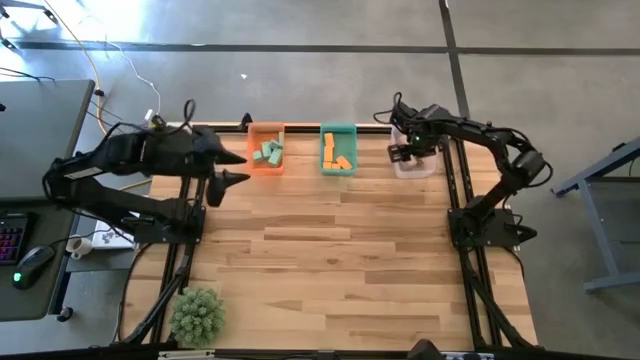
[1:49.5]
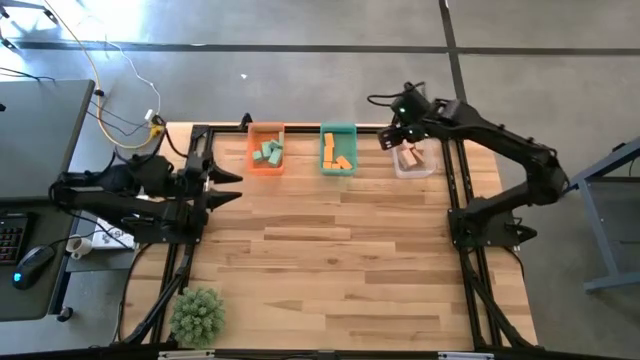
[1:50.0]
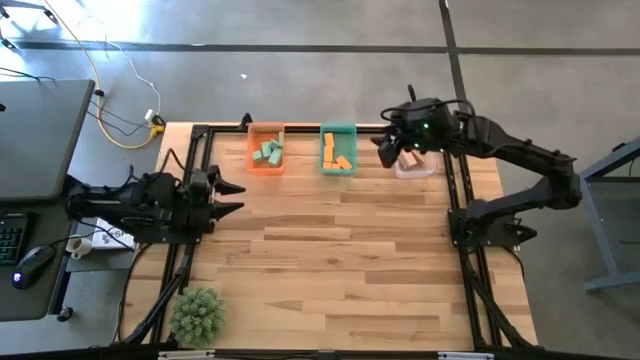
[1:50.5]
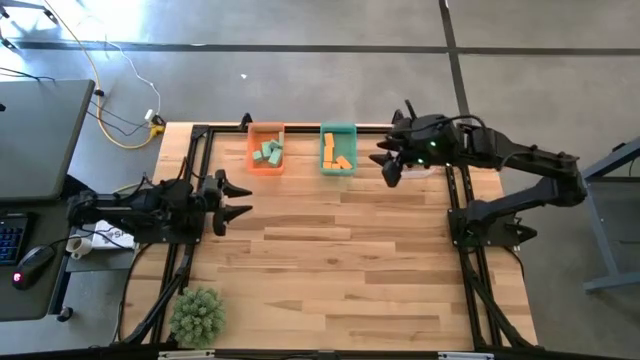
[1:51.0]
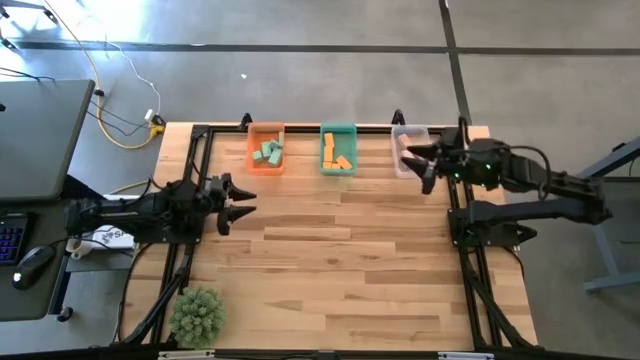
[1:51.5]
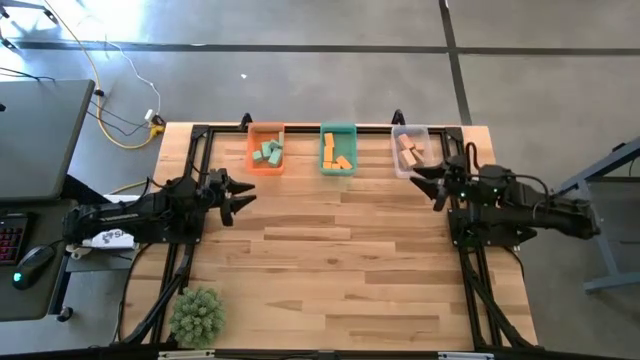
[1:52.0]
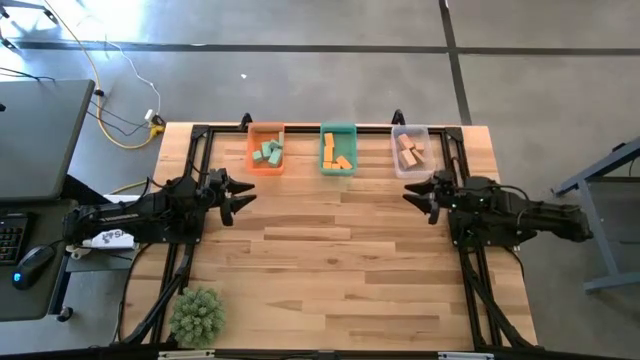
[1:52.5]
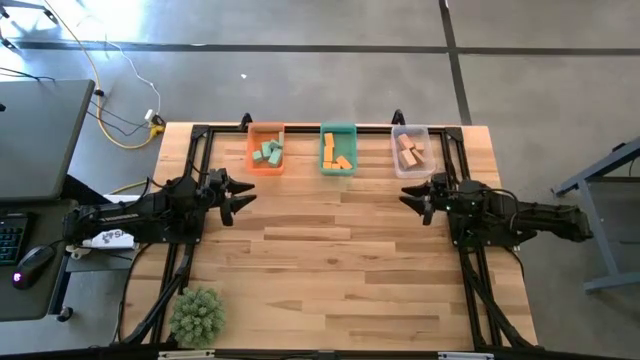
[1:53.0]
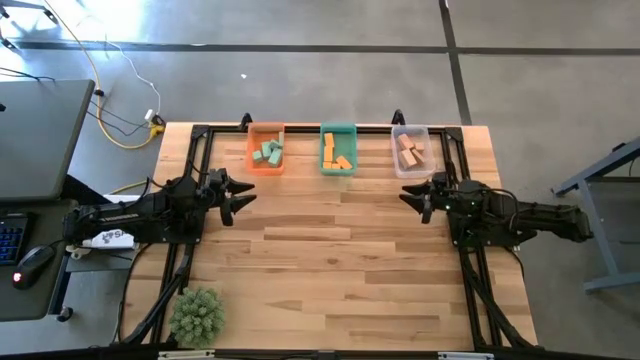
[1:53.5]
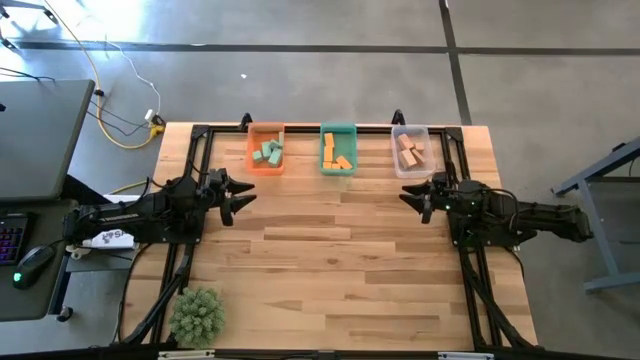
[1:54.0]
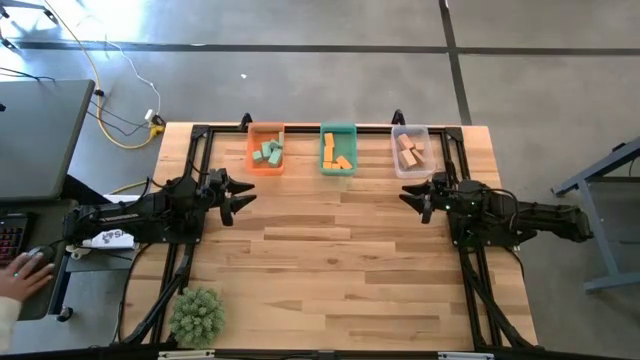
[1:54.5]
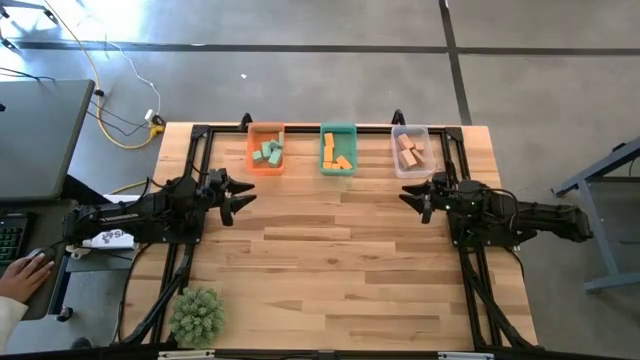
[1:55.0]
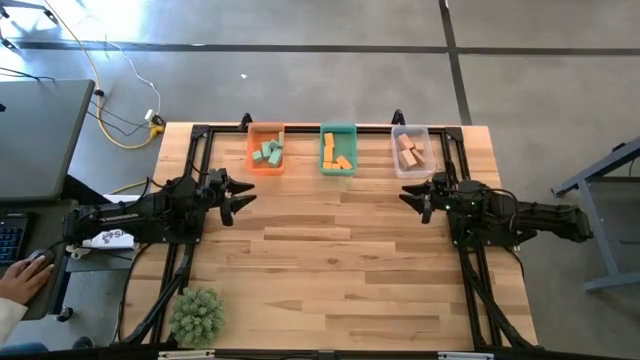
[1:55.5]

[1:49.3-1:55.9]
Task: Sort & place blocks by color
Return to Home Position

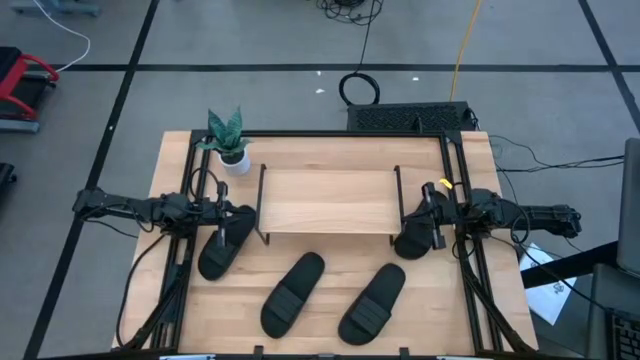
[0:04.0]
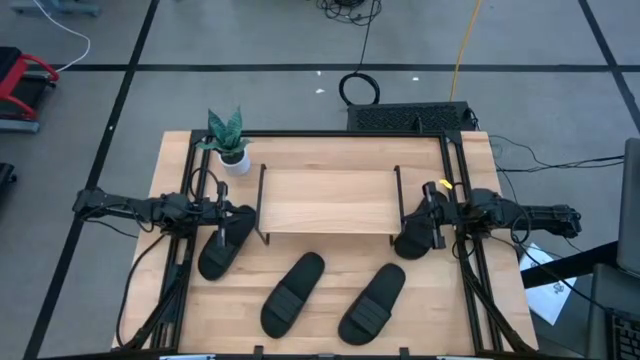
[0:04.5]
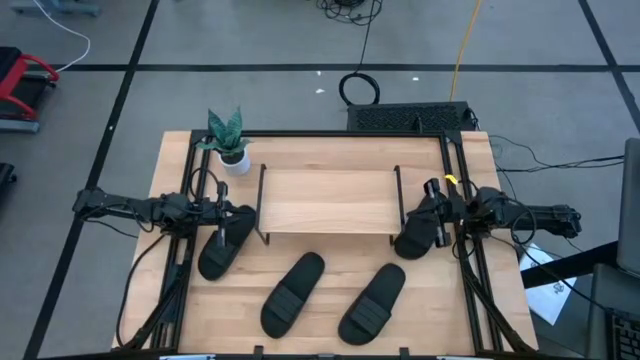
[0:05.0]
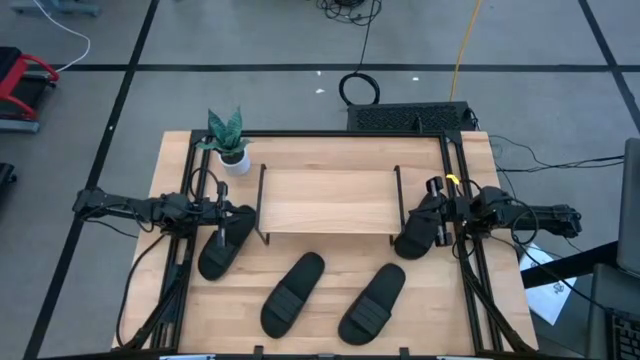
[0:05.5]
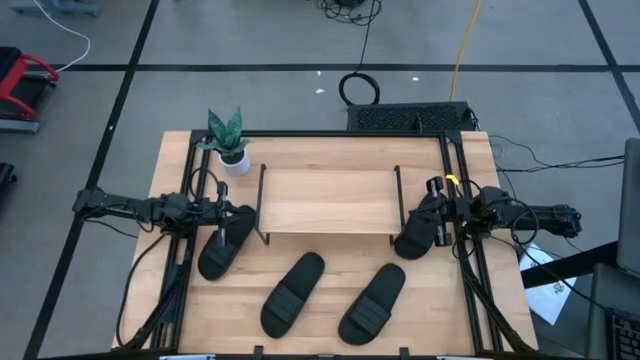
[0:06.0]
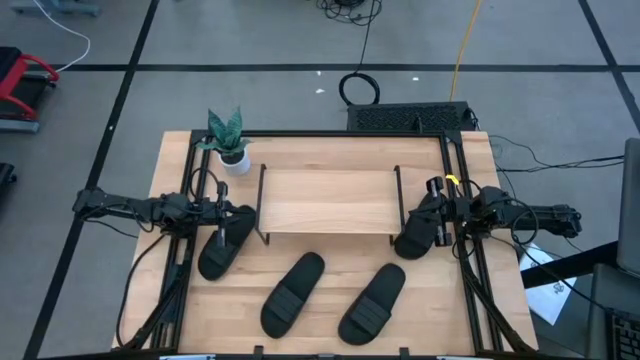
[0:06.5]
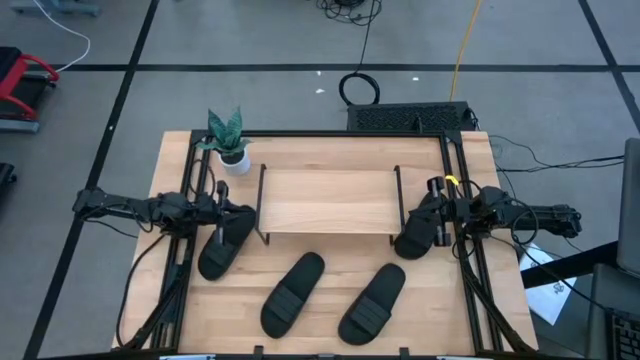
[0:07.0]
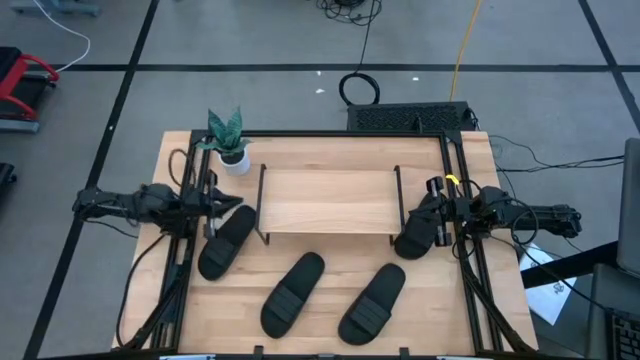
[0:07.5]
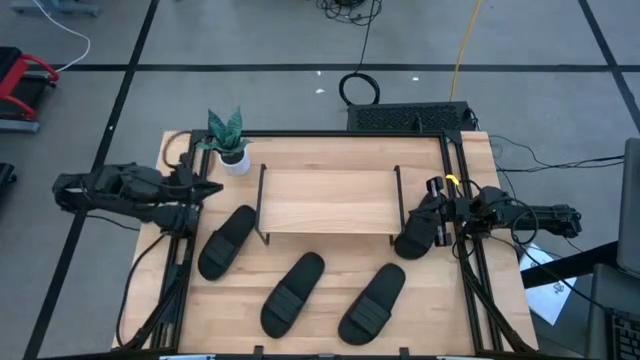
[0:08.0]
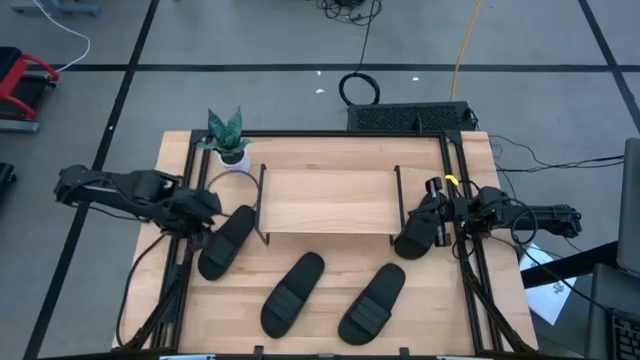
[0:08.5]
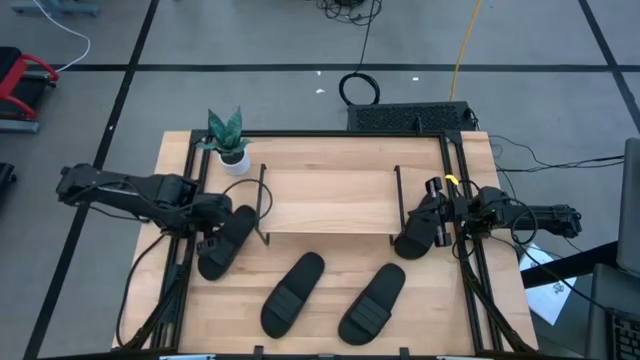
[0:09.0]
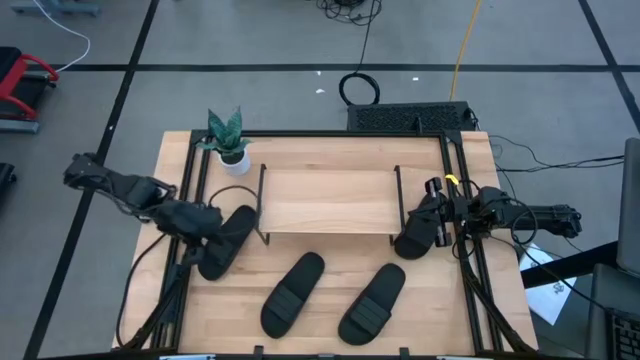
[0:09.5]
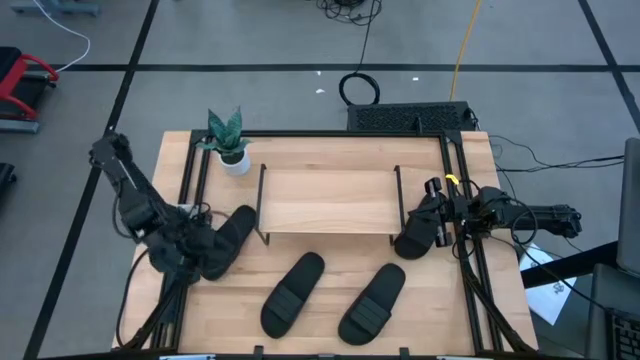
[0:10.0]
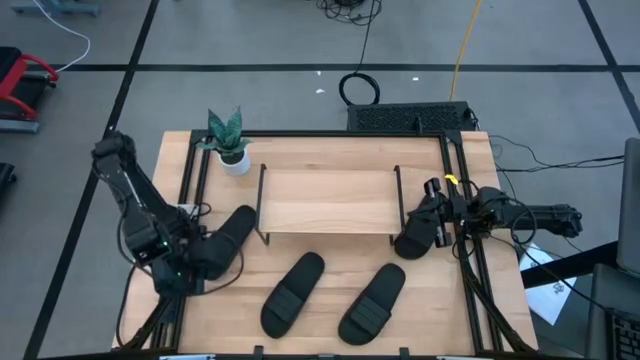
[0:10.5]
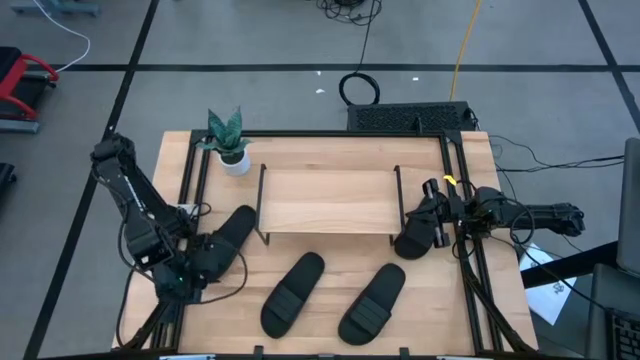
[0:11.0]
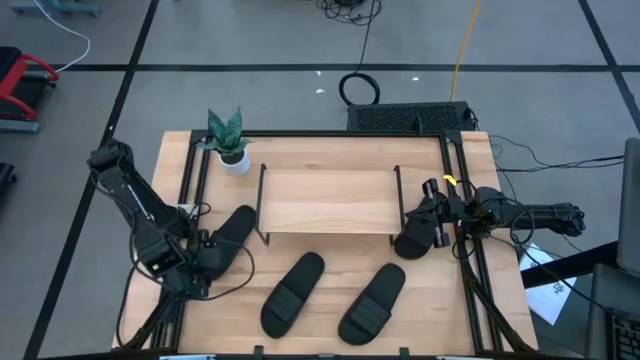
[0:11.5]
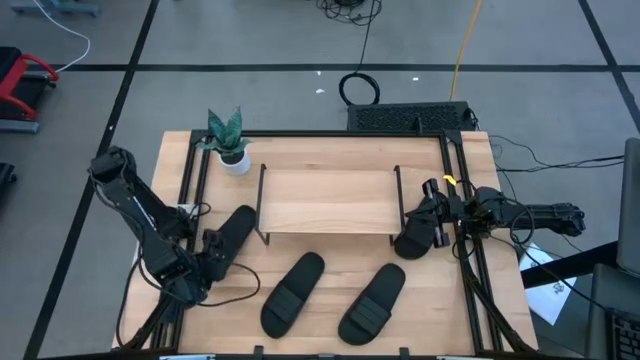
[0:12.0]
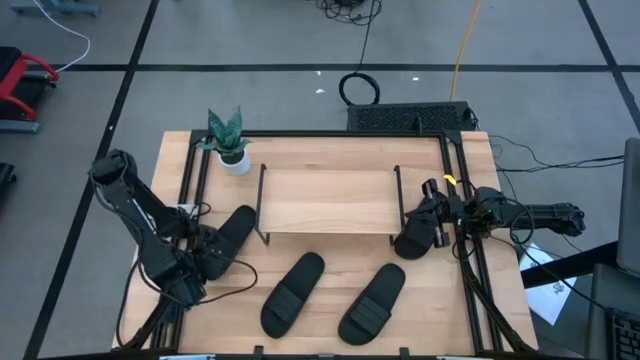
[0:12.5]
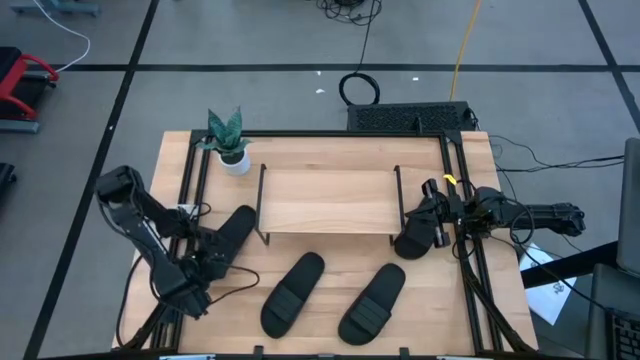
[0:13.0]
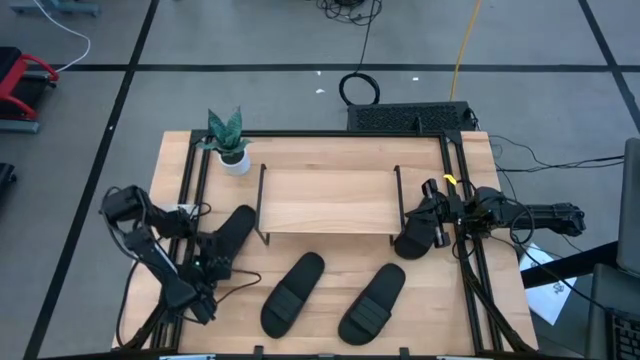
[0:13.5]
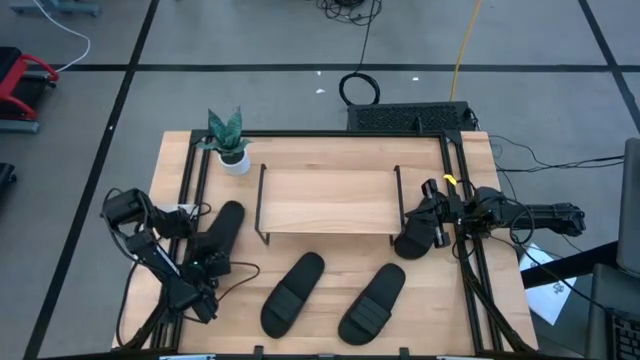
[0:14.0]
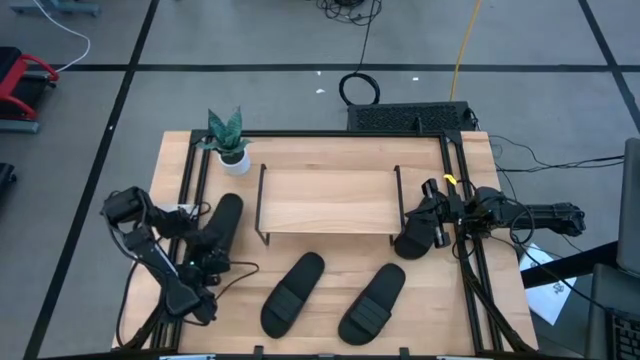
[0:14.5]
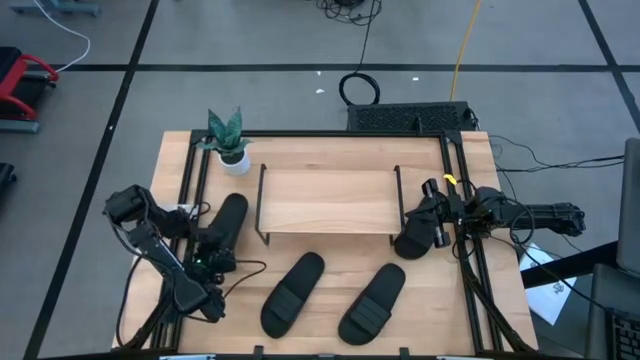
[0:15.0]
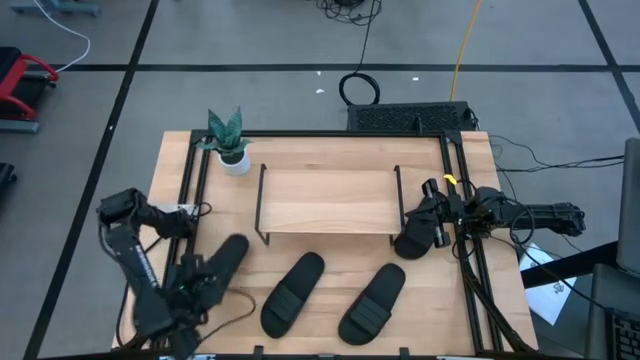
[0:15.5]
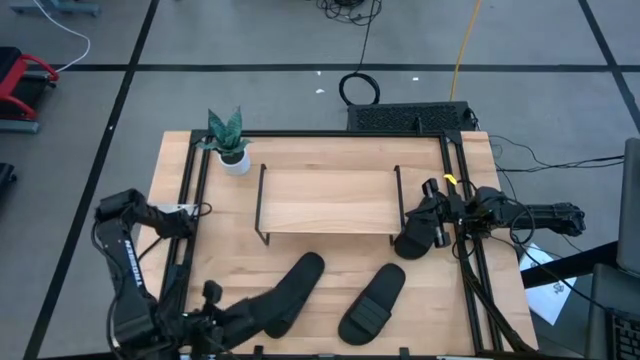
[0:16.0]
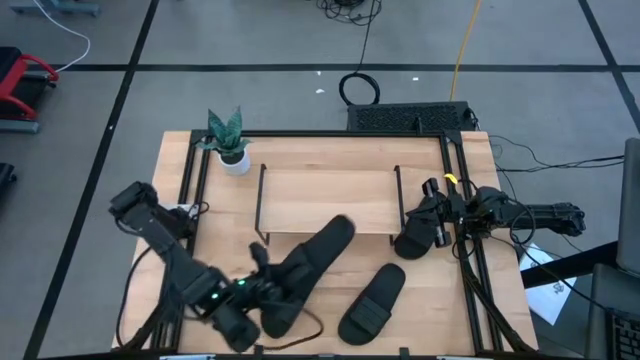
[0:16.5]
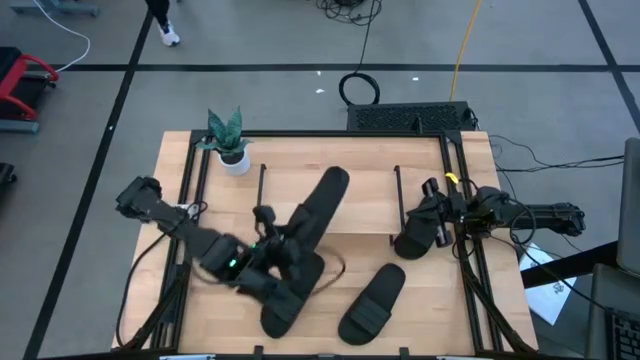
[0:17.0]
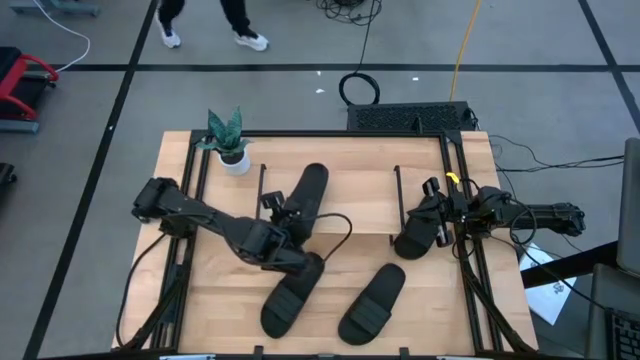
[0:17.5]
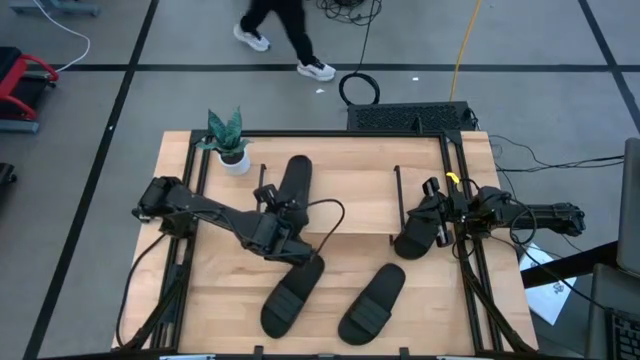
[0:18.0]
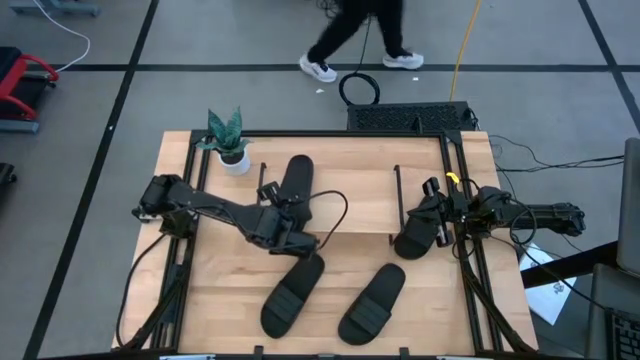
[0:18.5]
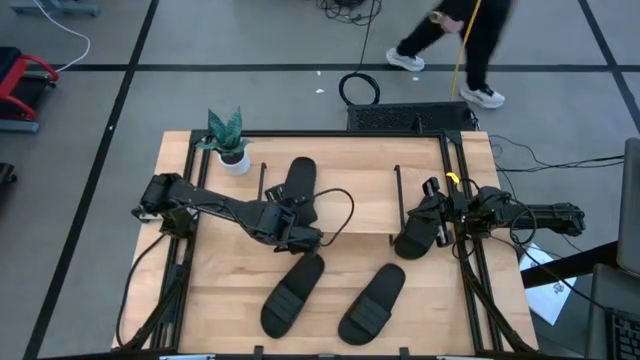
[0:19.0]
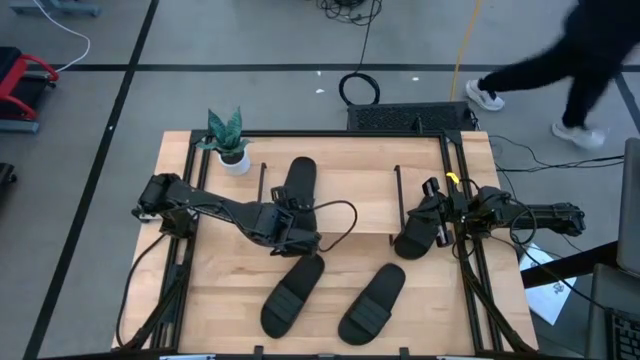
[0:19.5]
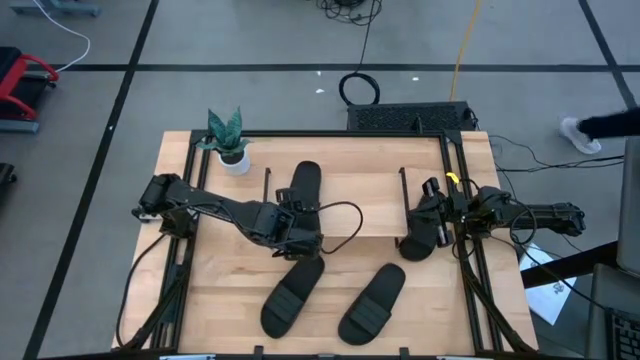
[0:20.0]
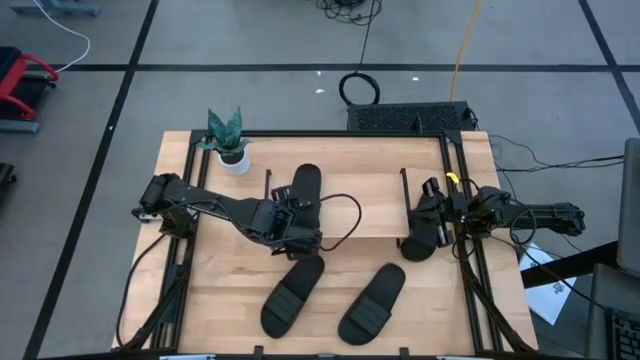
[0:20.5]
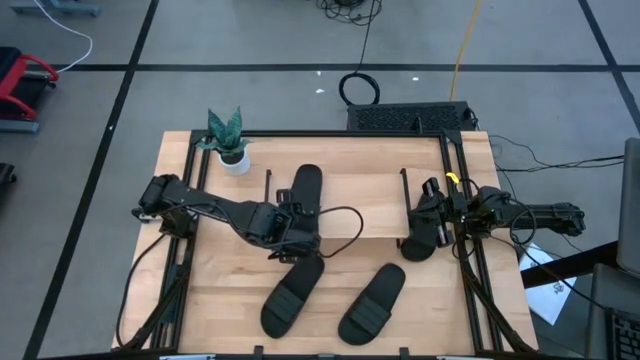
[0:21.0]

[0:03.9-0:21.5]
Task: Pick and place slides into the shelf
Put the black slipper on the shelf
